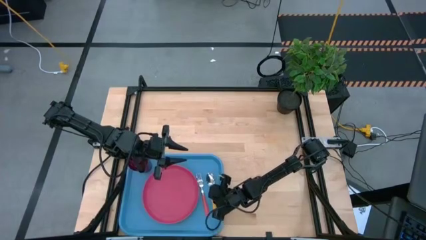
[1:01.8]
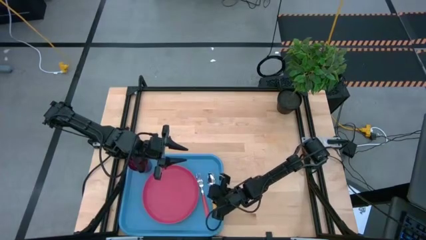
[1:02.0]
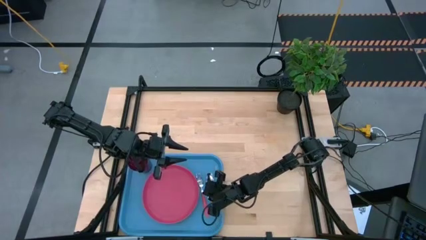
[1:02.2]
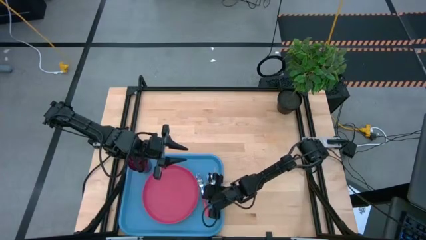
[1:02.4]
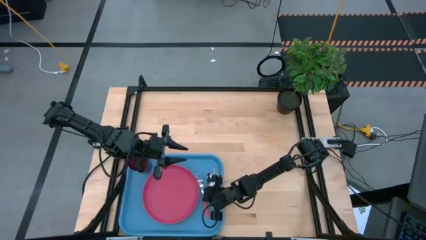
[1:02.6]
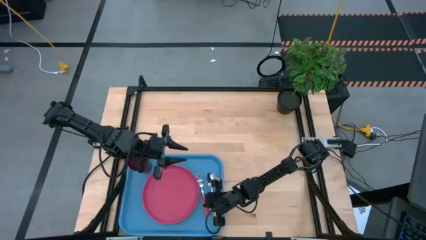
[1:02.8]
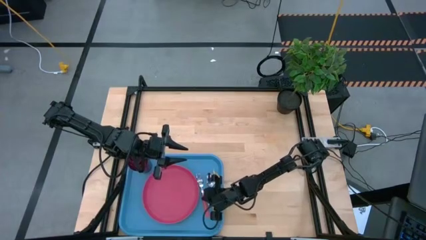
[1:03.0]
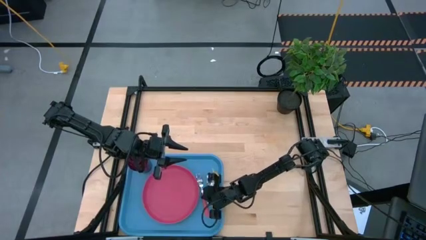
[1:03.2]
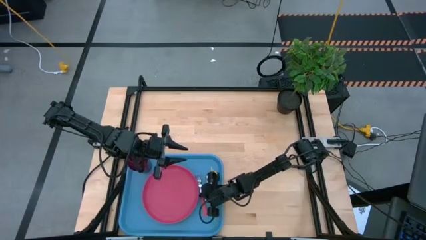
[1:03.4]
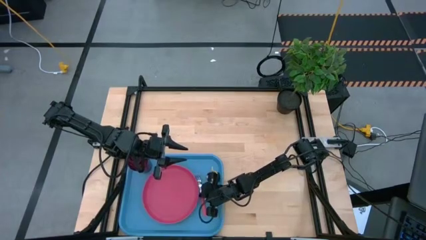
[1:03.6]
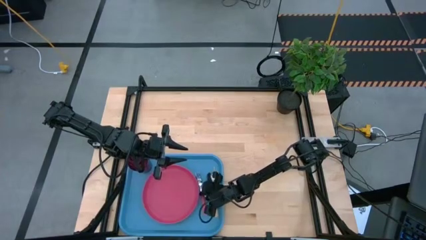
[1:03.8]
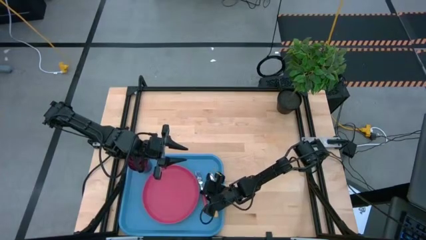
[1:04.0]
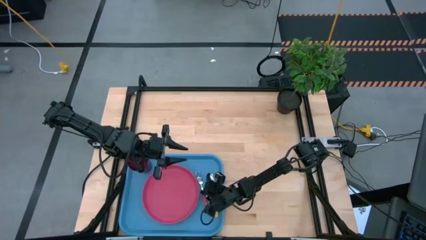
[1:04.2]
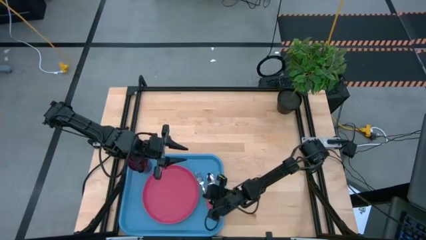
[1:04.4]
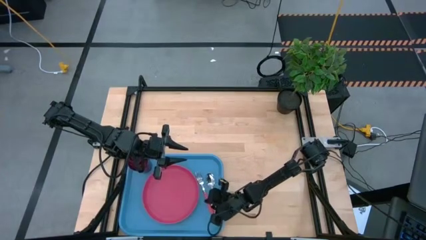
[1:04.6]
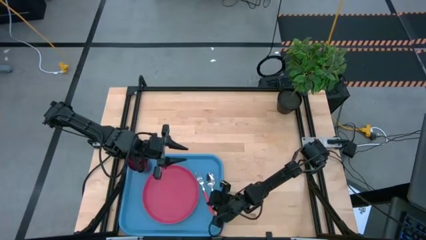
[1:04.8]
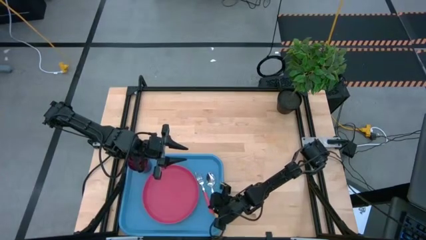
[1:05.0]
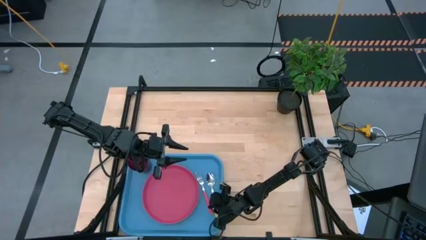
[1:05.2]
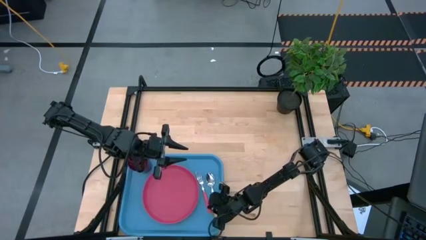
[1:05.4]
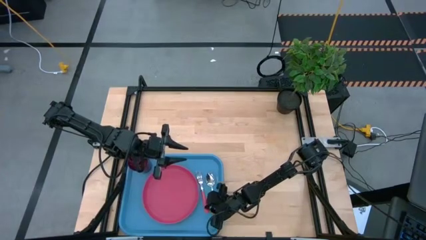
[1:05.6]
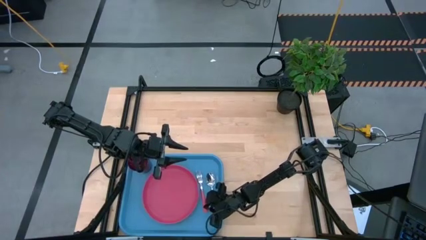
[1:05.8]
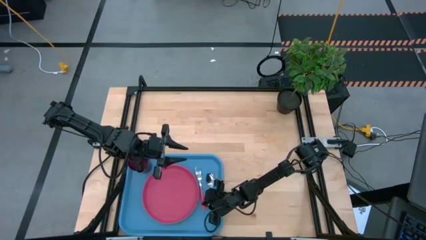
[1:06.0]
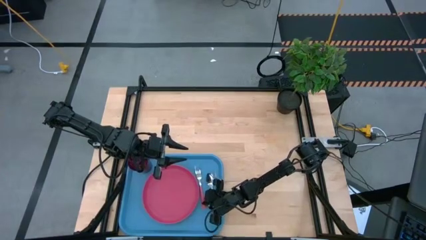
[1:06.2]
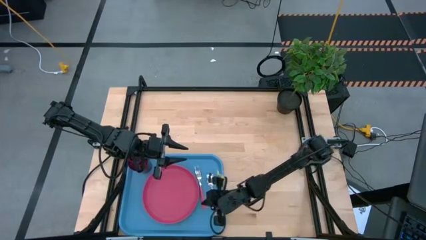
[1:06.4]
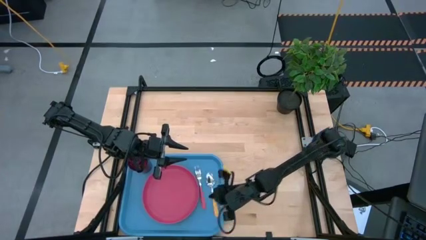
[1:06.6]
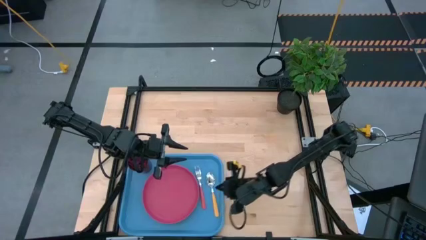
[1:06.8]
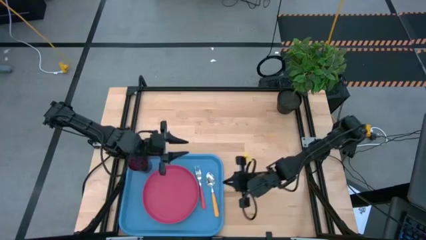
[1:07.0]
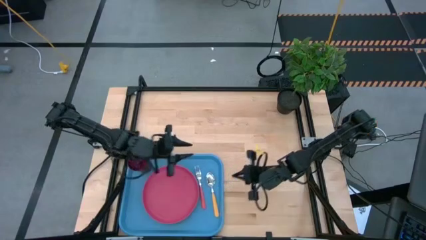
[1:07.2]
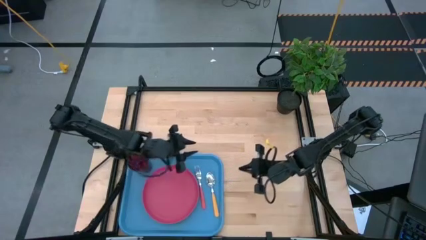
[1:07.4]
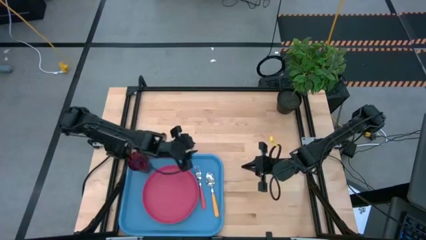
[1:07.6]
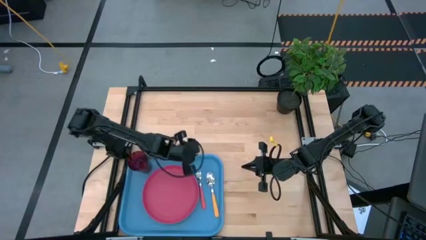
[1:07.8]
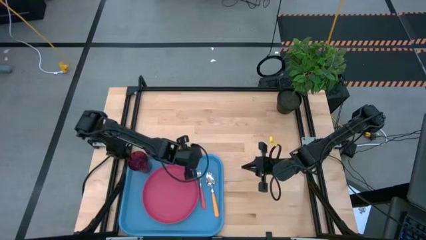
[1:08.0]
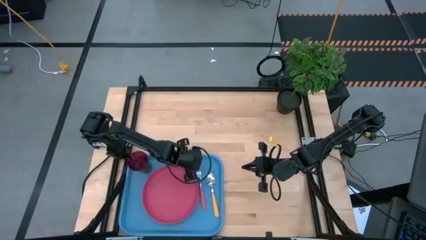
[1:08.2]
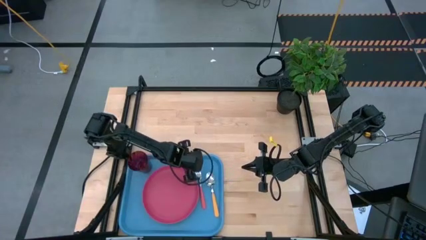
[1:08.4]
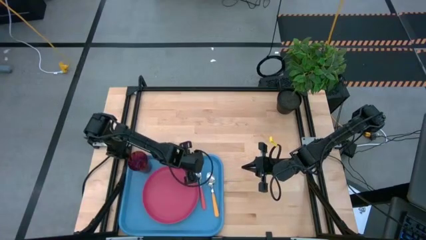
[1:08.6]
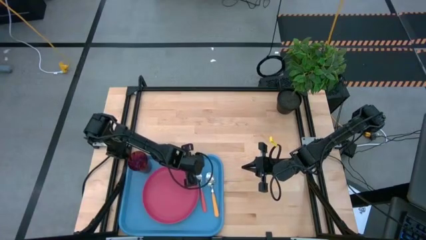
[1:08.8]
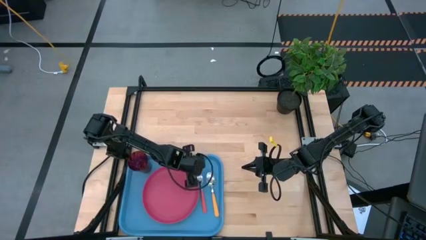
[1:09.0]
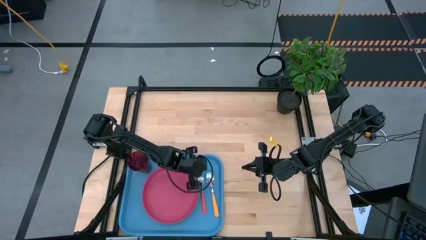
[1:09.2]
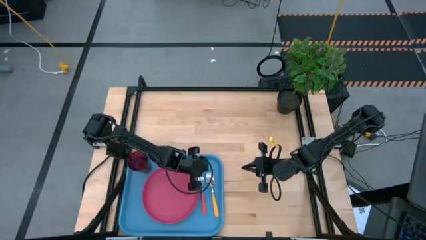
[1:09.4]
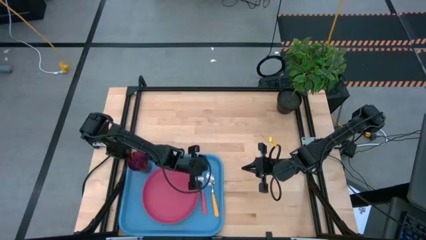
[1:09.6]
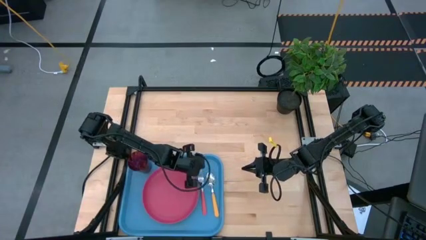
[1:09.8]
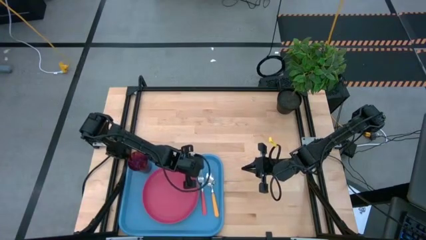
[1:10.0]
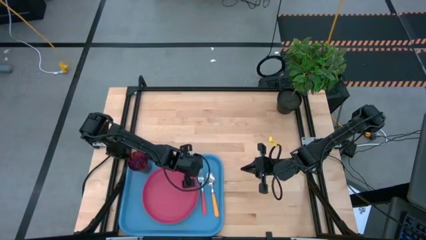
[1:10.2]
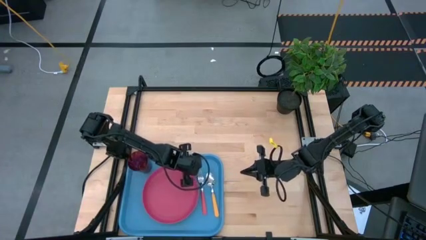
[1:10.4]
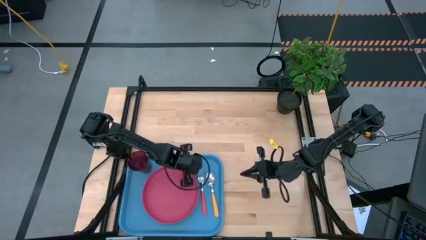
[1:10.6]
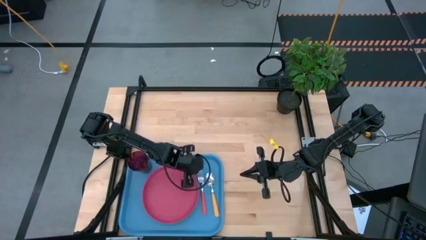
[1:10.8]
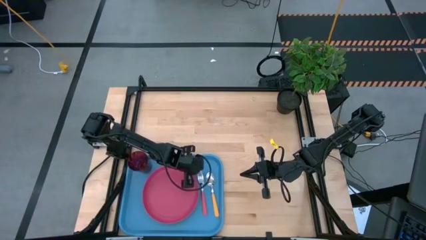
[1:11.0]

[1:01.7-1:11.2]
Task: Pick and place plate/cup/fork/spoon on tray
Adjust the pink fork on the blue serving tray

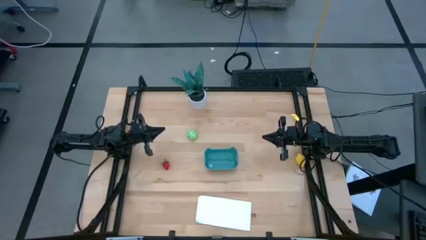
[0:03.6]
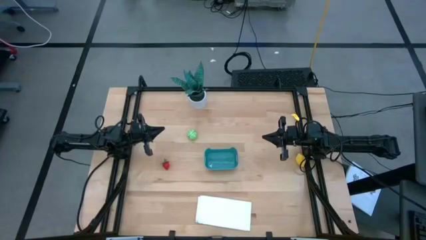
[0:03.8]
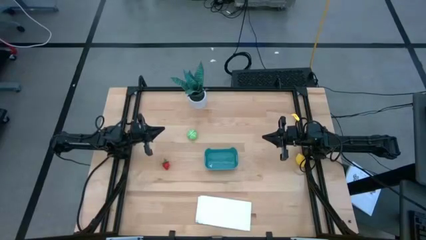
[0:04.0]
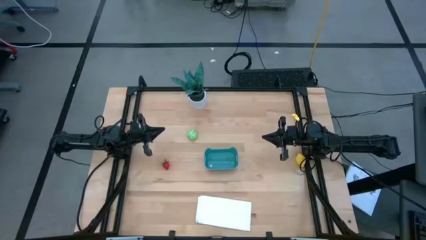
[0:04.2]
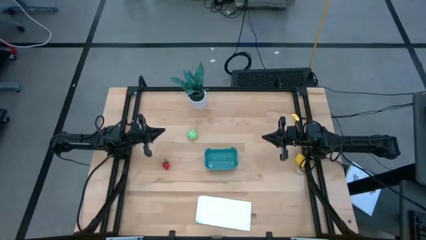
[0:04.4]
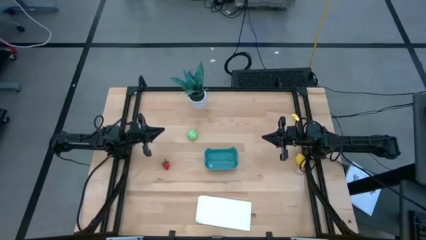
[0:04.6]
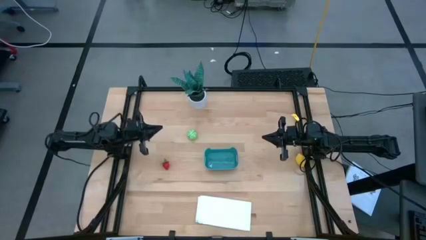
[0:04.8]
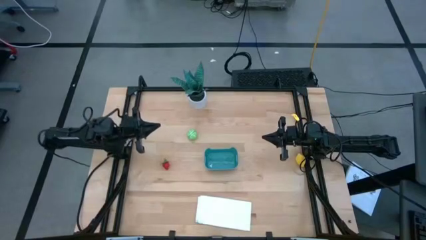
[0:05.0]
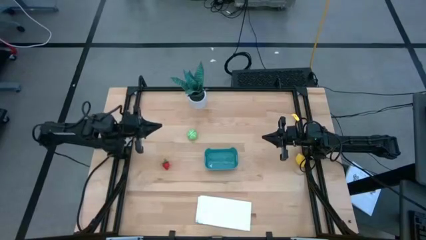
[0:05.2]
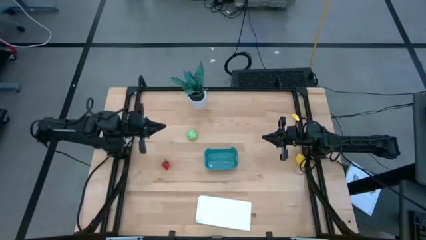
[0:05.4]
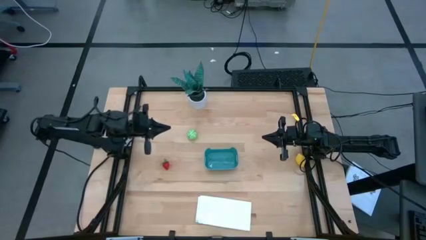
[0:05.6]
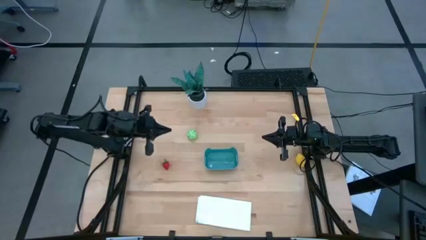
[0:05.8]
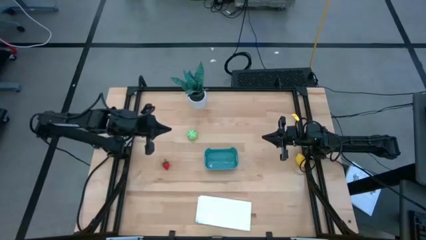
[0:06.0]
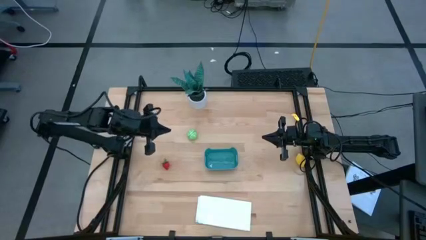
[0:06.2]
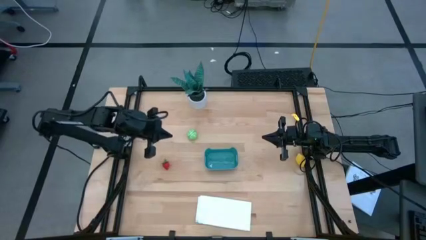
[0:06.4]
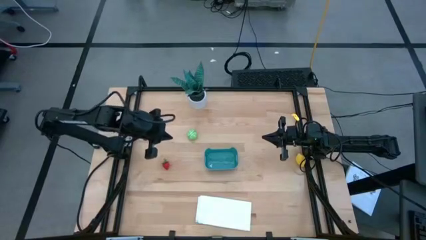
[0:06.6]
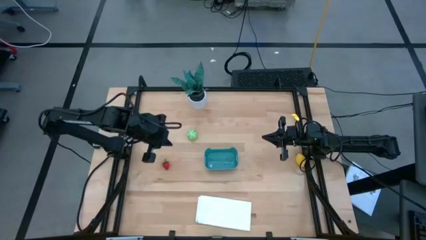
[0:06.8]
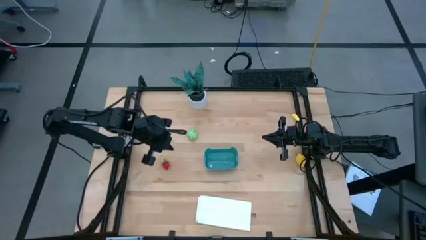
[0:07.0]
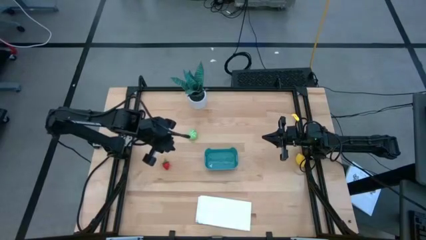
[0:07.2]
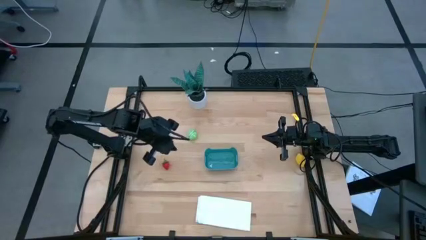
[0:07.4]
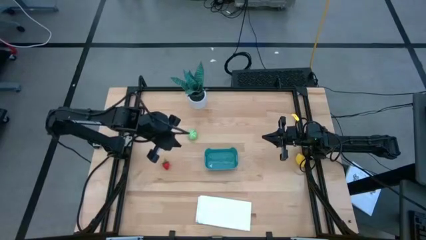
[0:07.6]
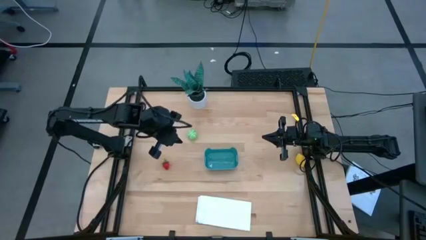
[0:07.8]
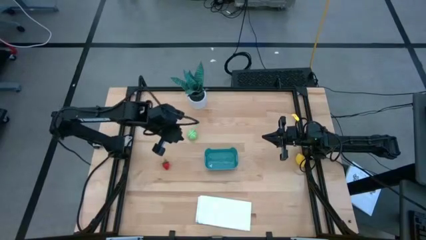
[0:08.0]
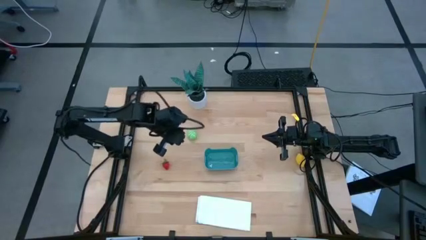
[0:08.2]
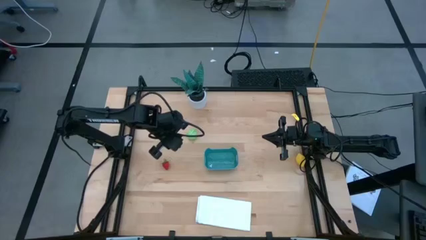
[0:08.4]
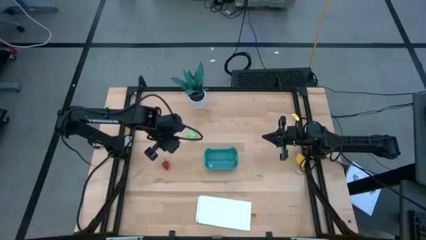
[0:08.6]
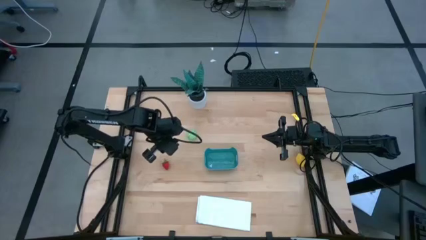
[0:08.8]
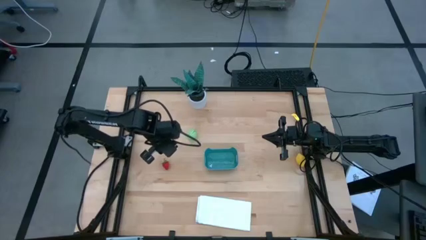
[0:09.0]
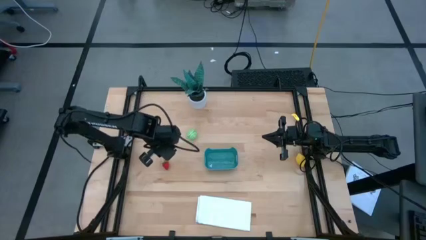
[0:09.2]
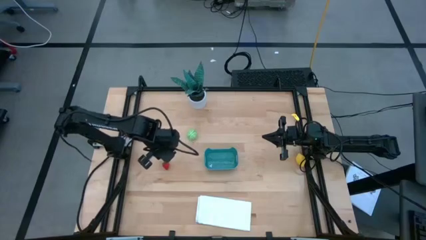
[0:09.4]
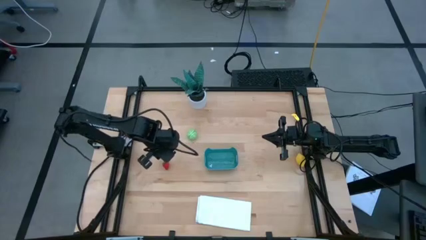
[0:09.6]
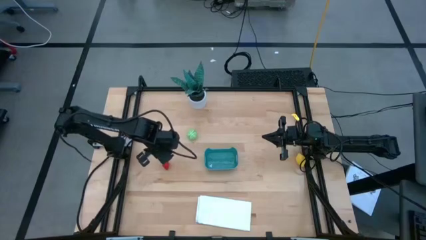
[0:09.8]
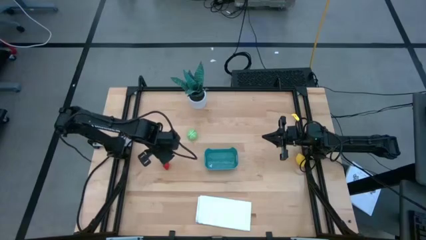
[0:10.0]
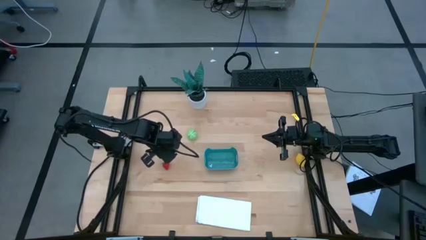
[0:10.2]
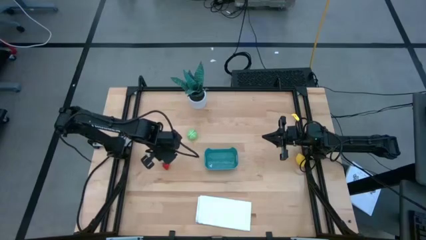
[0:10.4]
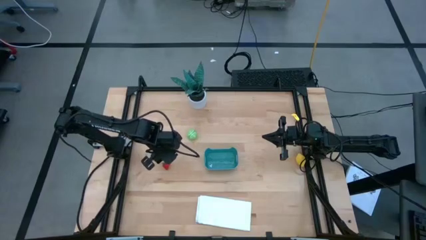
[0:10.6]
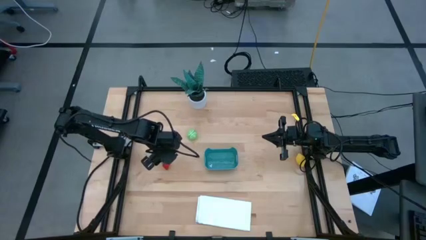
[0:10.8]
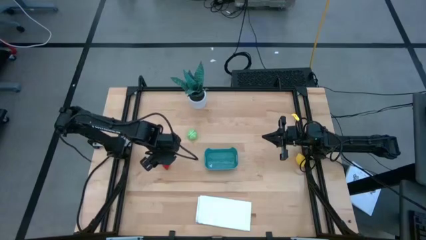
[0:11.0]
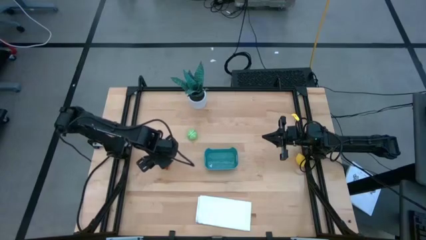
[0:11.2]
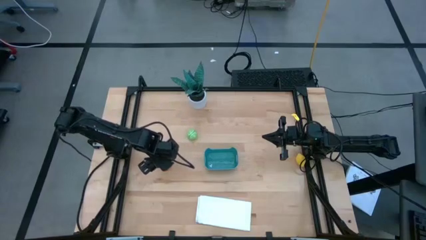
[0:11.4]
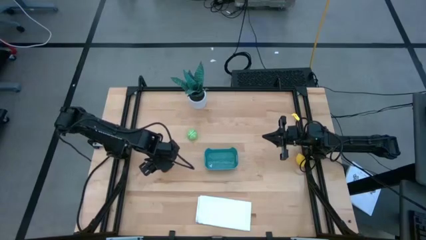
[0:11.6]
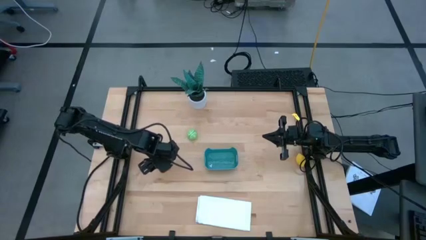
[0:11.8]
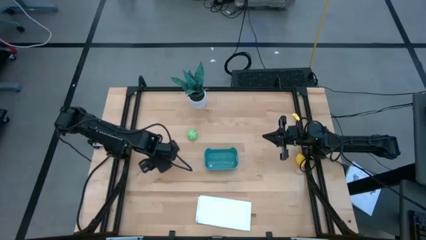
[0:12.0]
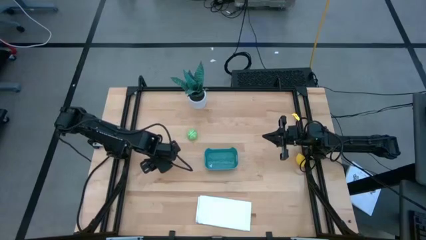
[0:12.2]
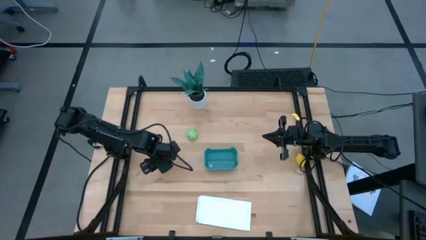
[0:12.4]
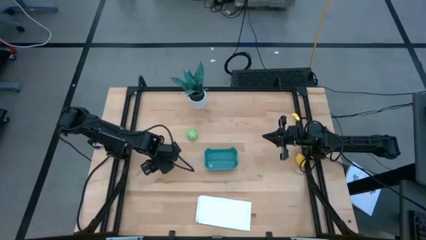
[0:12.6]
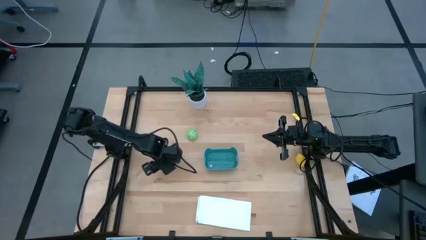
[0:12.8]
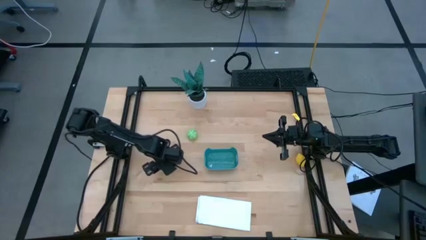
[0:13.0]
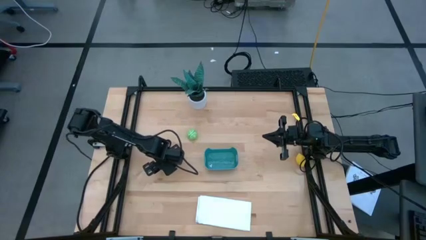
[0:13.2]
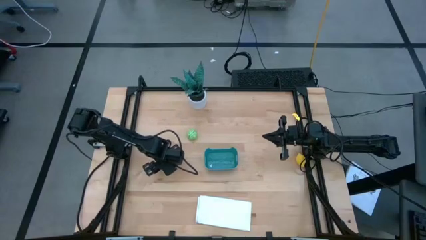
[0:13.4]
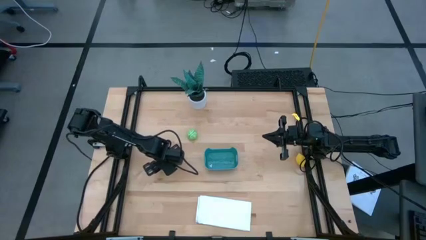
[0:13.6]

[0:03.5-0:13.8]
Task: Pick and placing Produce into tupperware
Put the red strawberry into the blue container
